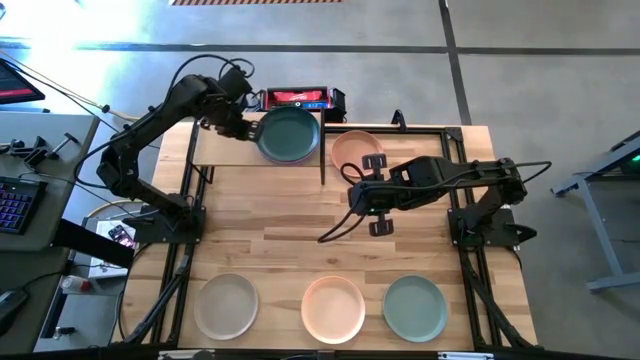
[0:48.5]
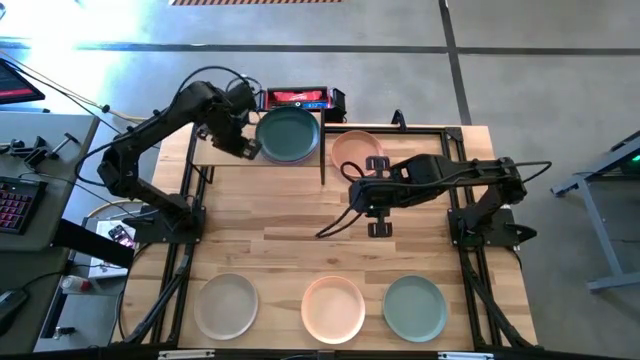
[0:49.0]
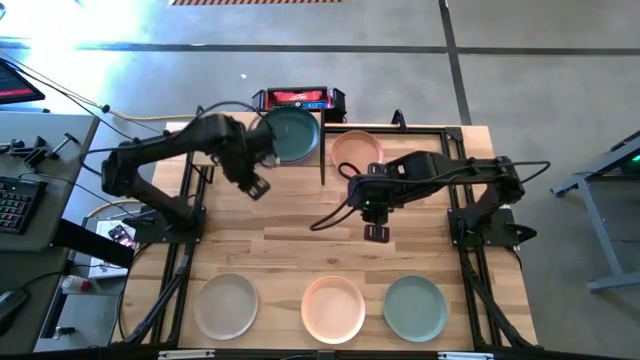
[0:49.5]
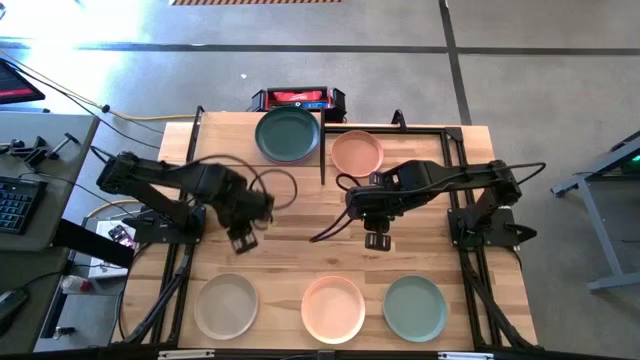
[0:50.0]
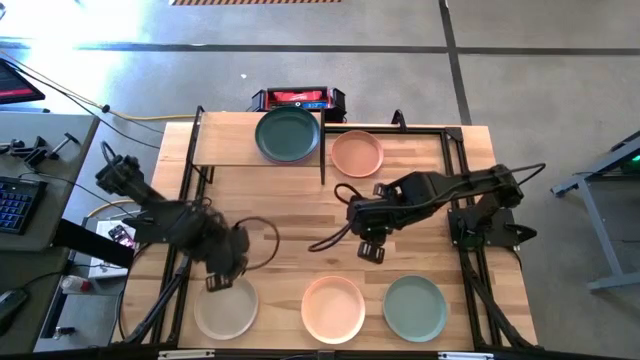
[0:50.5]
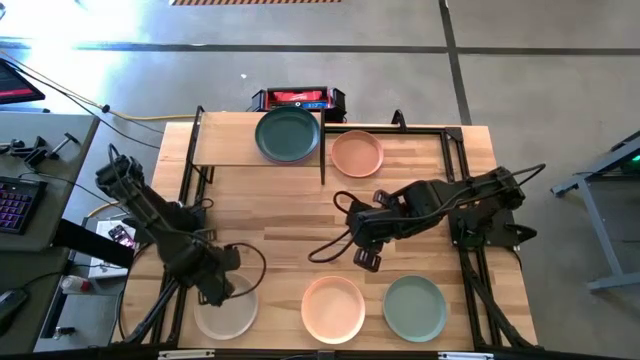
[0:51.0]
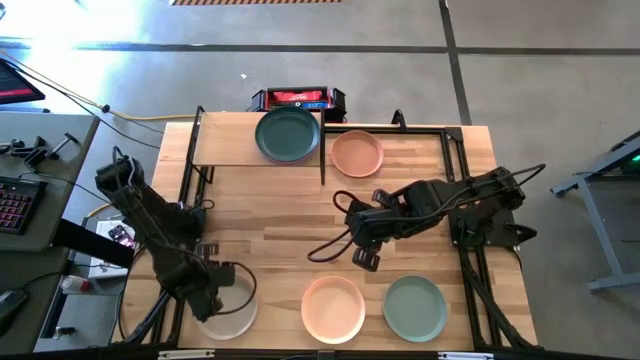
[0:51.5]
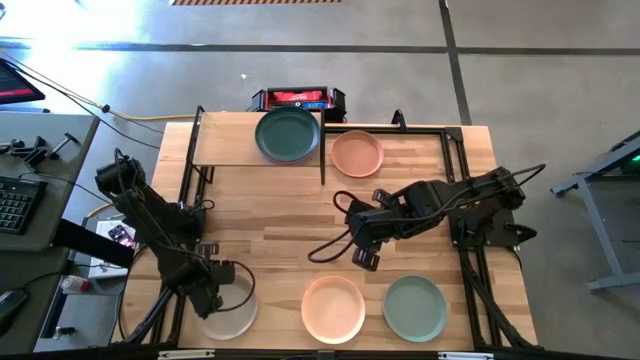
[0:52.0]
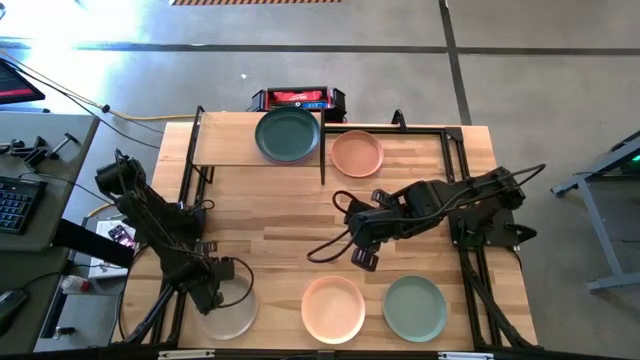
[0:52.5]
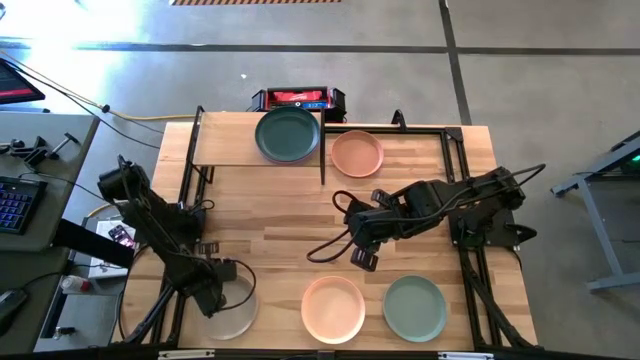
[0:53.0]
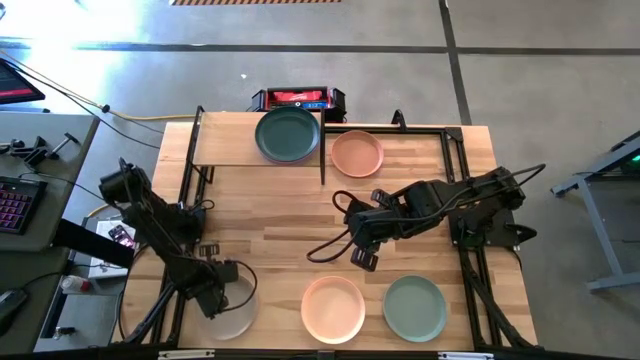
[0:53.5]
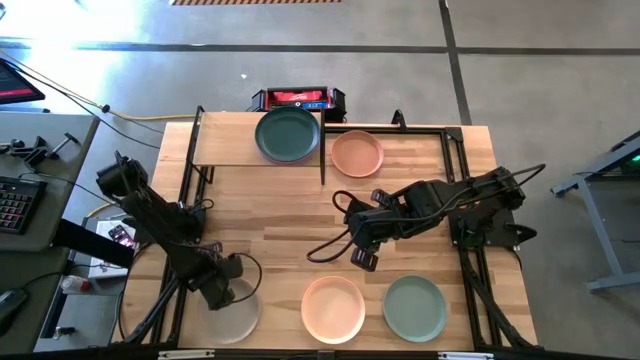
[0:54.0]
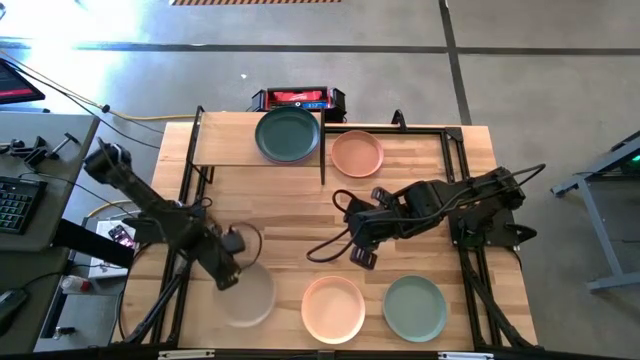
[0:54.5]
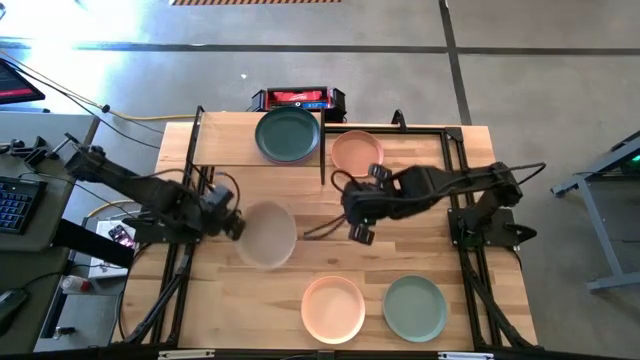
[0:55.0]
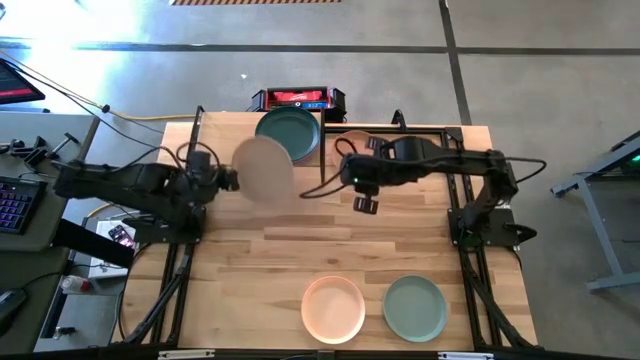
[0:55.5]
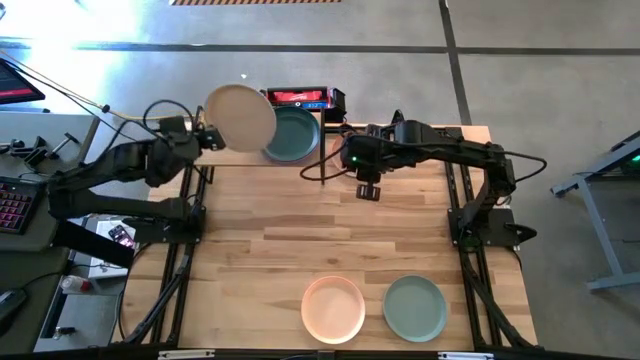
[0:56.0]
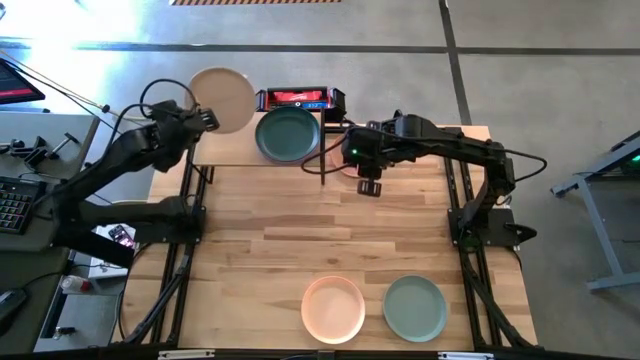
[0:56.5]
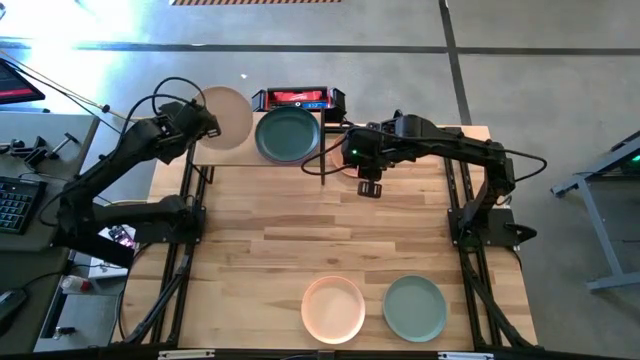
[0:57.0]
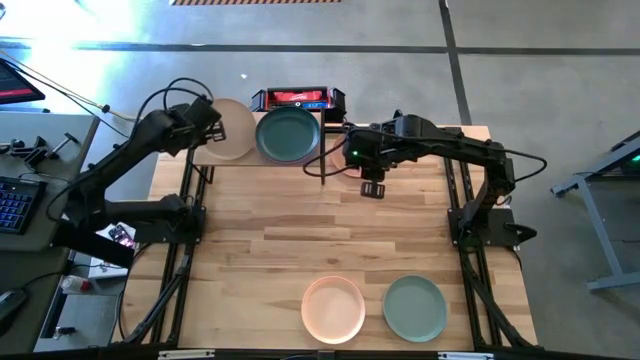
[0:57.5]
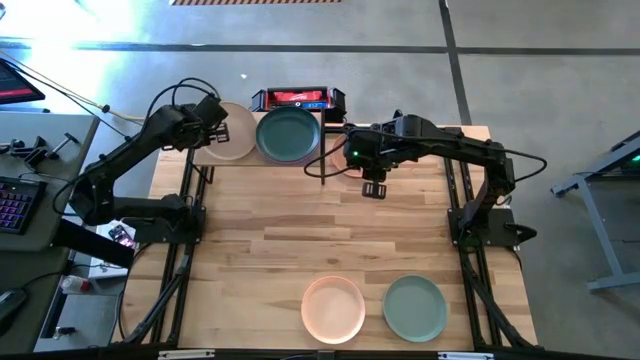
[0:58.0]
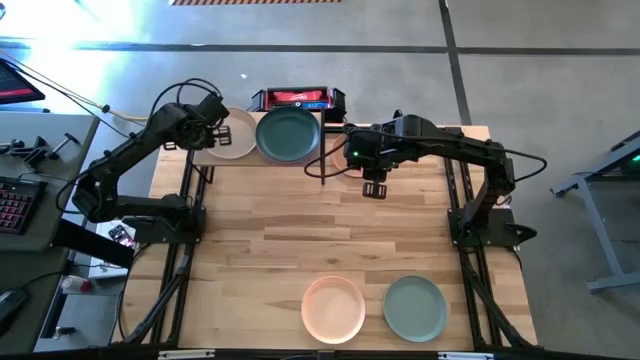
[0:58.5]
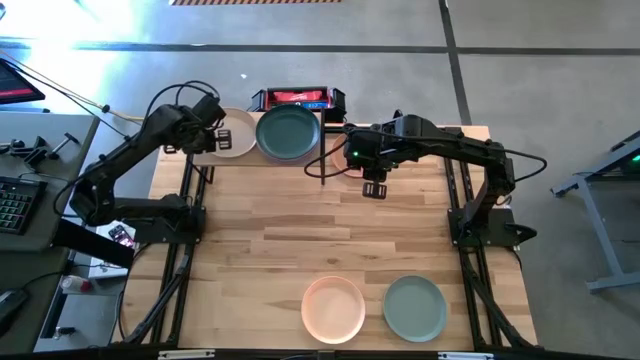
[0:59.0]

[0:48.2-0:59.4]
Task: Place and stack plates onto a shelf
Put the white plate on the shelf

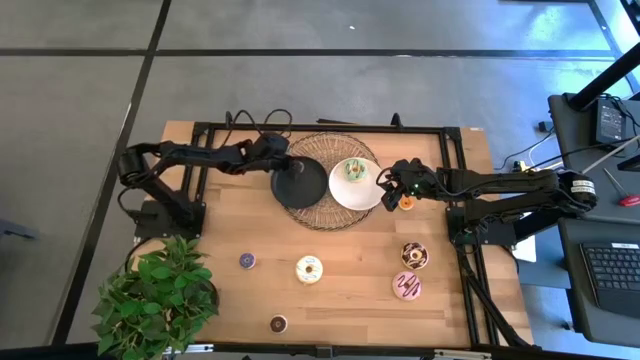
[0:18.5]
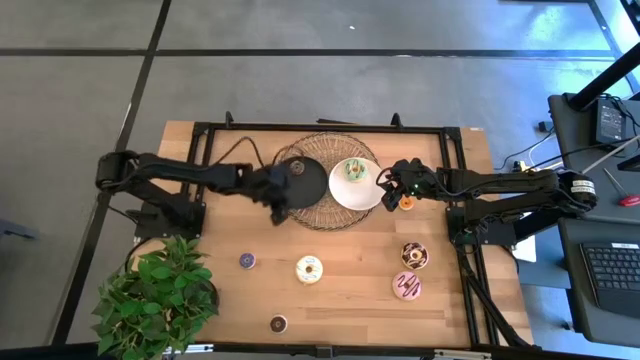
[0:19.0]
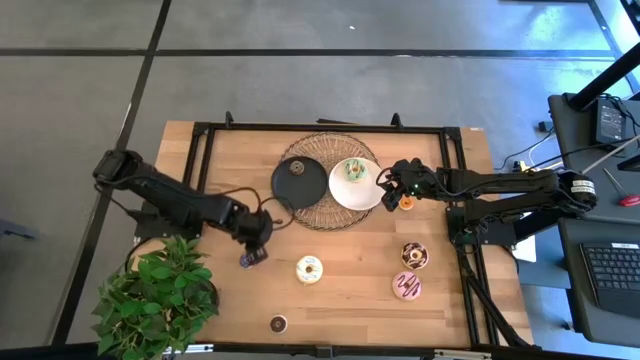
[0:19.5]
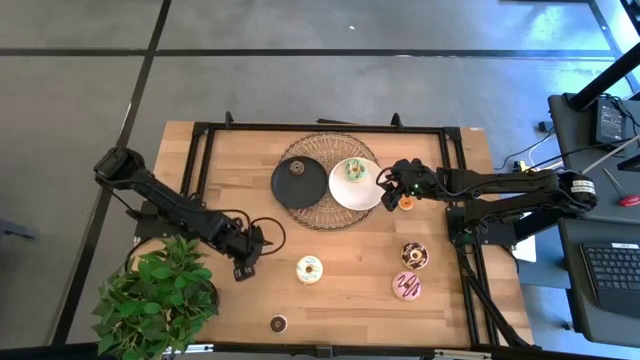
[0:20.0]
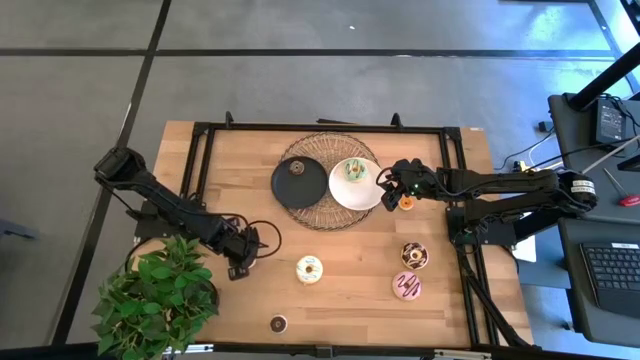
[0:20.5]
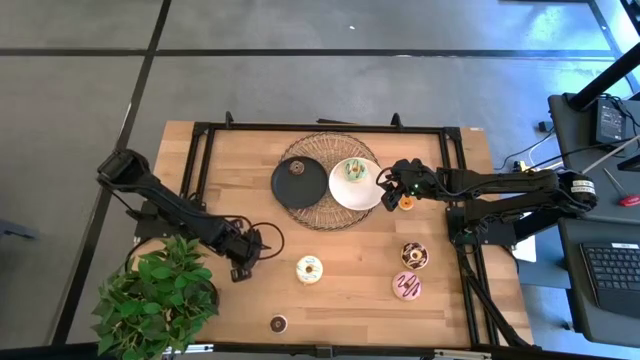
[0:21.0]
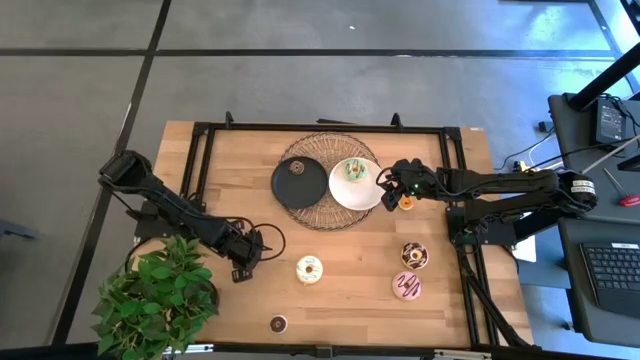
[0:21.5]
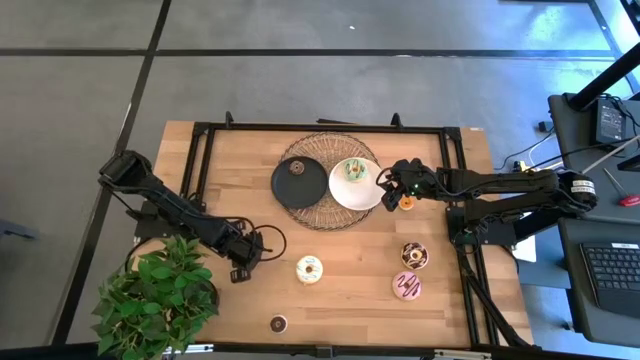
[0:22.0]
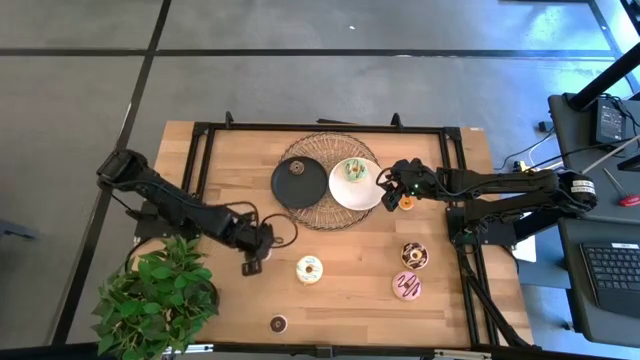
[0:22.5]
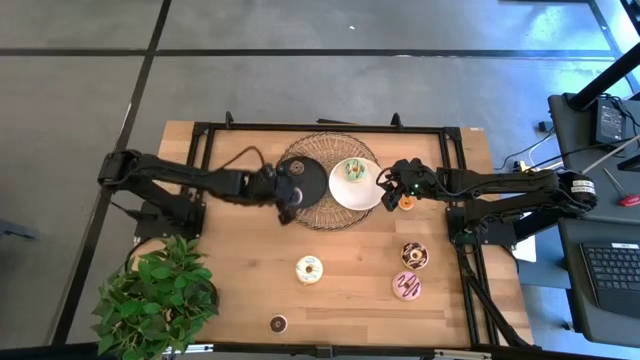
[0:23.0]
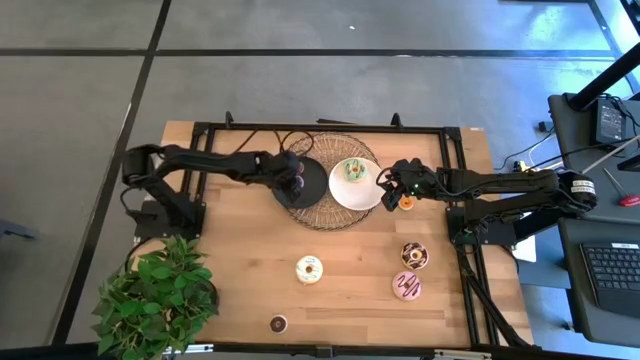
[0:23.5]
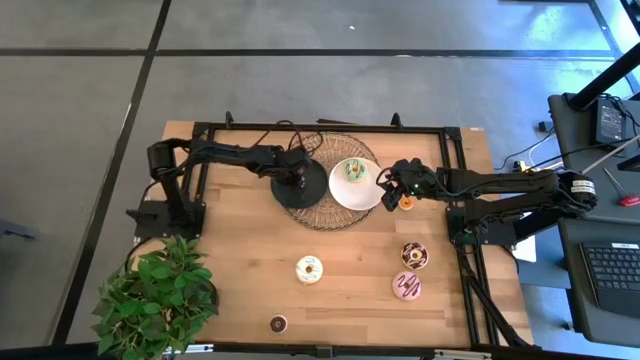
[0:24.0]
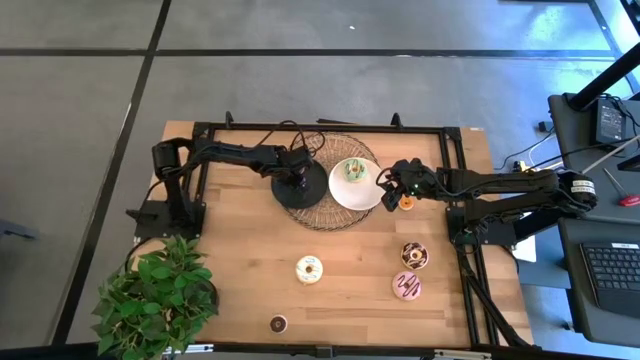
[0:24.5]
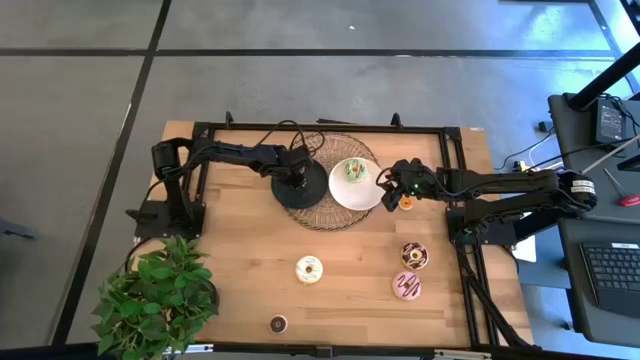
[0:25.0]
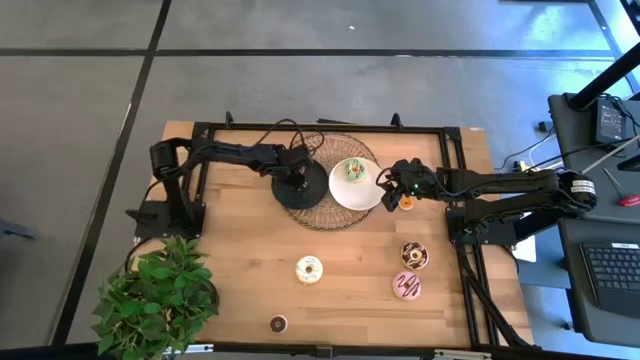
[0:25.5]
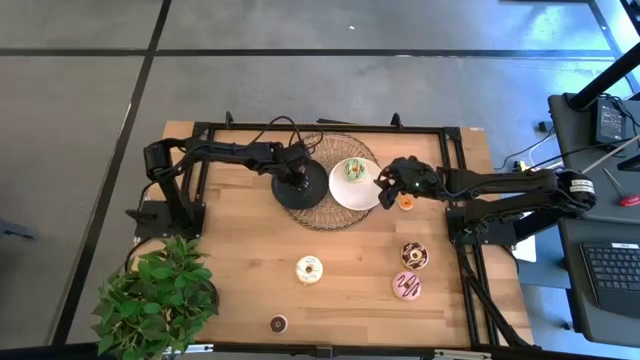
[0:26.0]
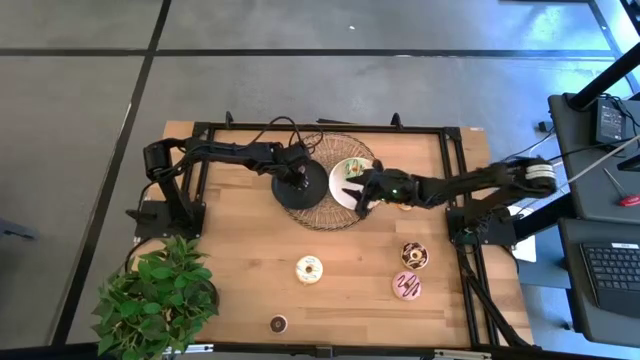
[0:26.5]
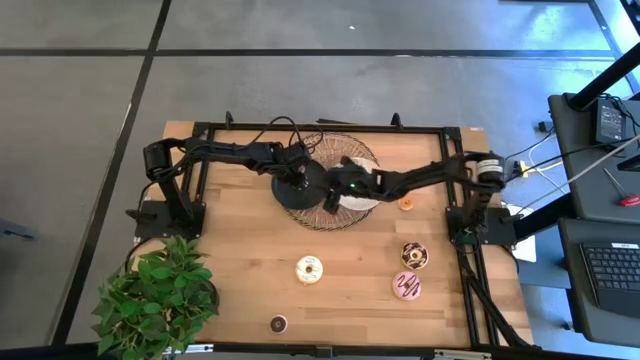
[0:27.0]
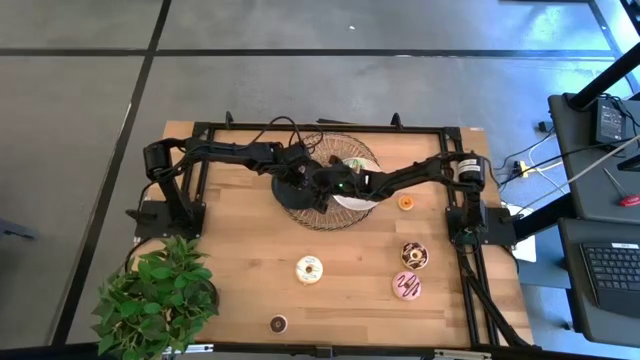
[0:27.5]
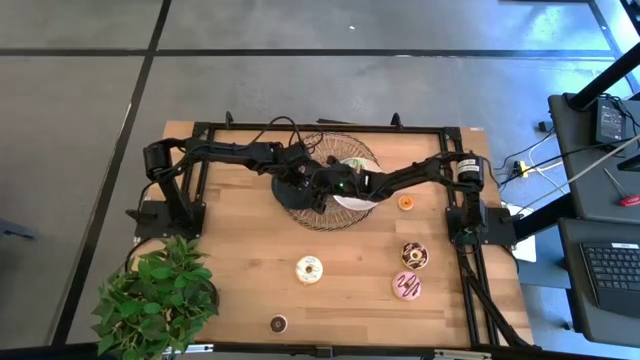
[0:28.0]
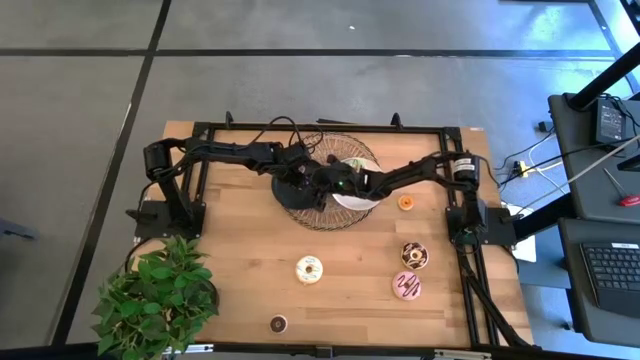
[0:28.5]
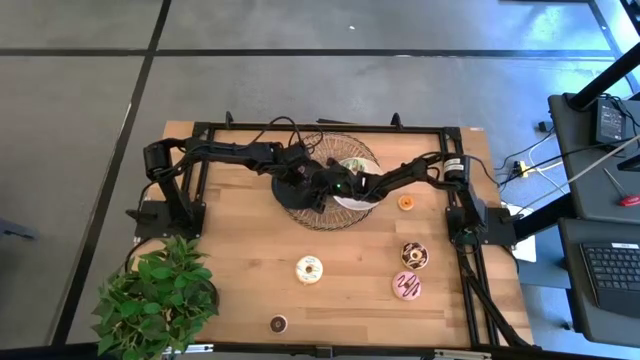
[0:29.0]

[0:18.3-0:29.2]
Task: Pick & Place donuts
Put the small violet donut on the black plate
